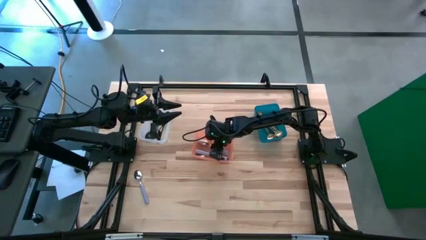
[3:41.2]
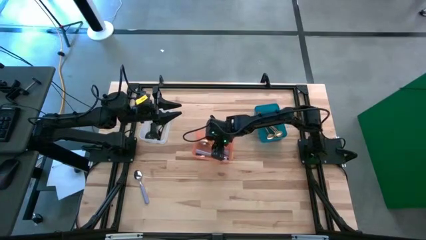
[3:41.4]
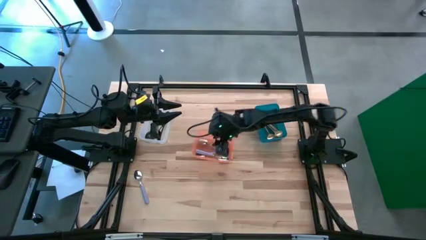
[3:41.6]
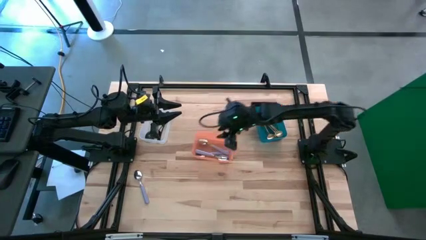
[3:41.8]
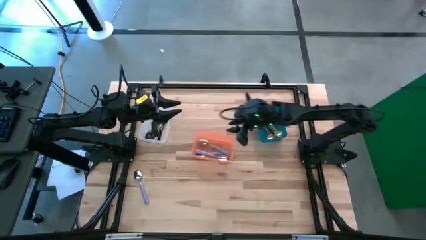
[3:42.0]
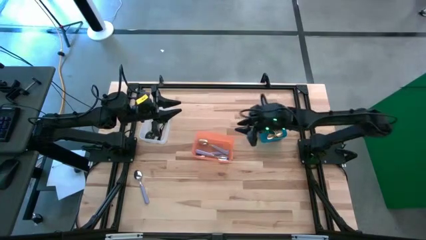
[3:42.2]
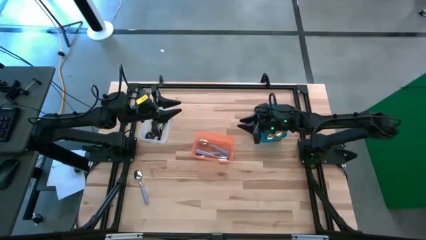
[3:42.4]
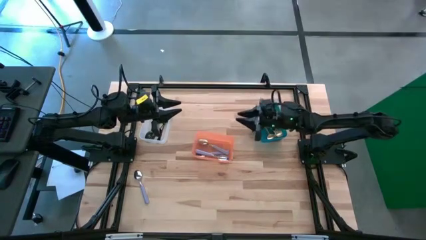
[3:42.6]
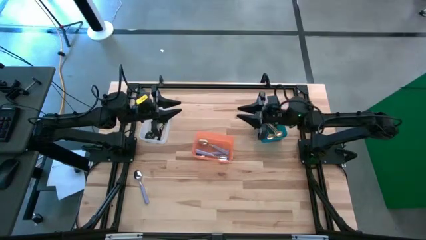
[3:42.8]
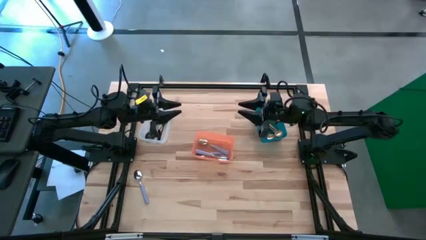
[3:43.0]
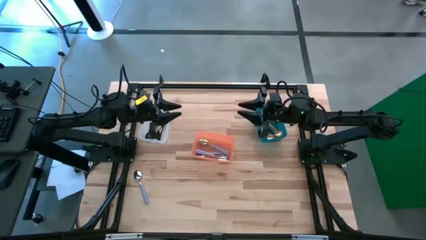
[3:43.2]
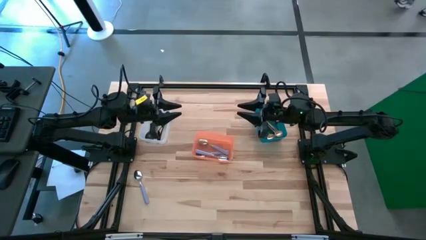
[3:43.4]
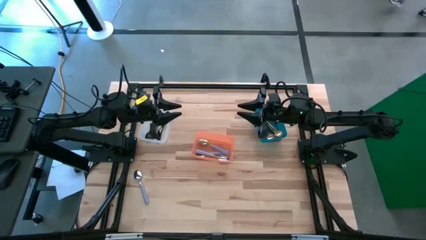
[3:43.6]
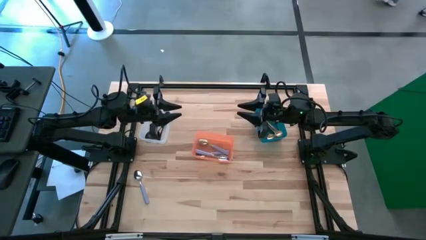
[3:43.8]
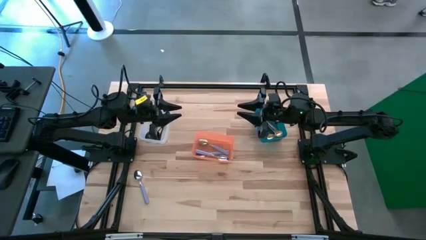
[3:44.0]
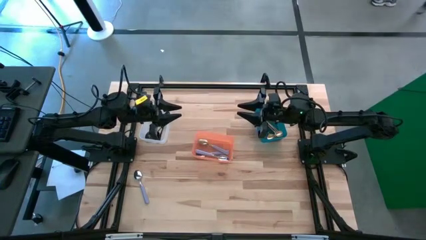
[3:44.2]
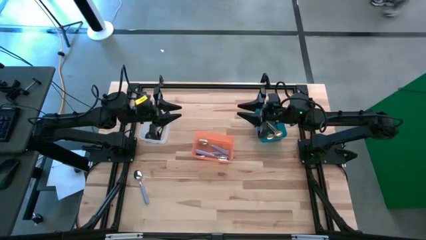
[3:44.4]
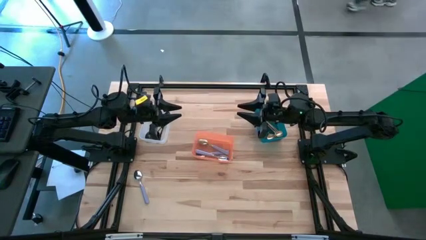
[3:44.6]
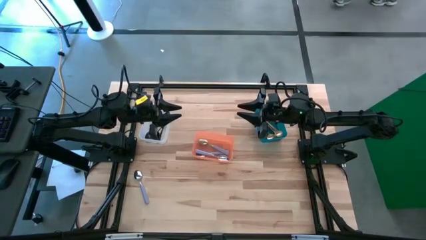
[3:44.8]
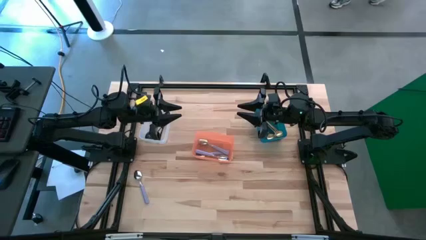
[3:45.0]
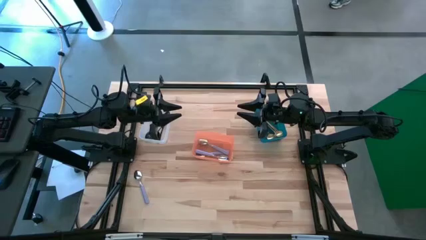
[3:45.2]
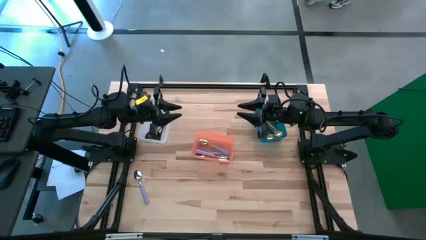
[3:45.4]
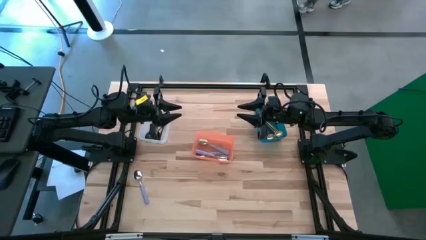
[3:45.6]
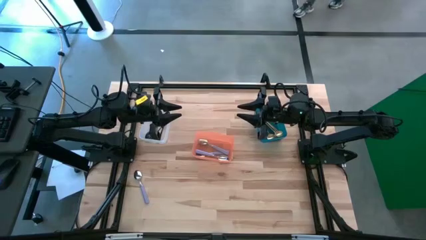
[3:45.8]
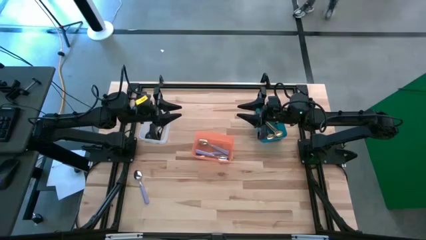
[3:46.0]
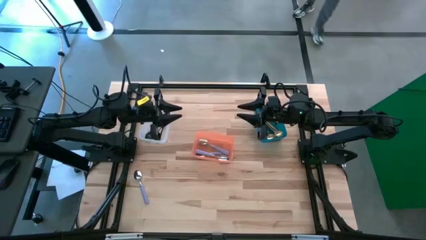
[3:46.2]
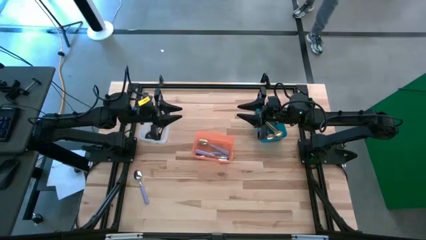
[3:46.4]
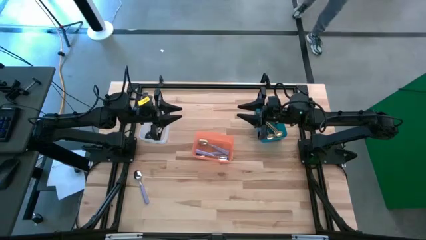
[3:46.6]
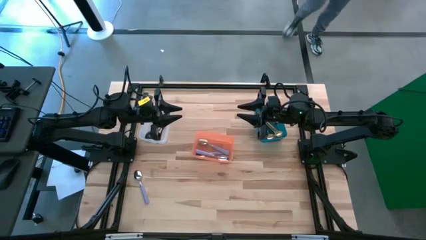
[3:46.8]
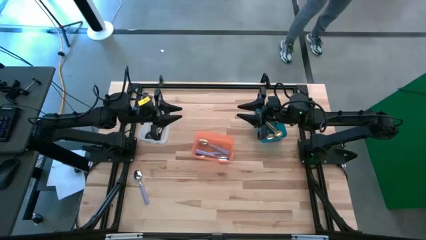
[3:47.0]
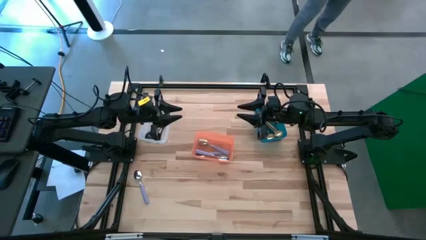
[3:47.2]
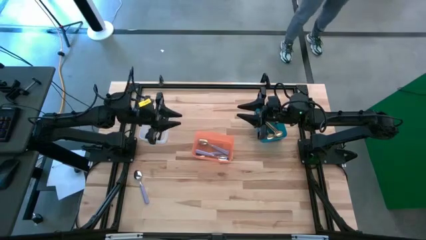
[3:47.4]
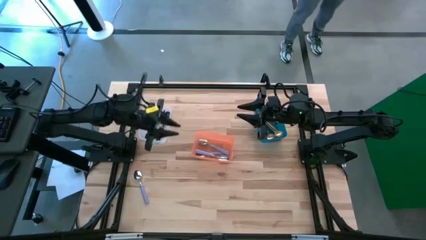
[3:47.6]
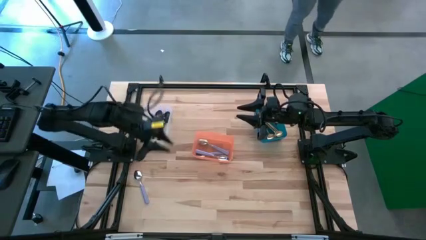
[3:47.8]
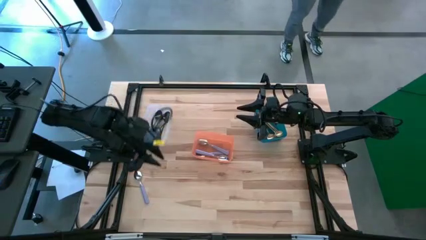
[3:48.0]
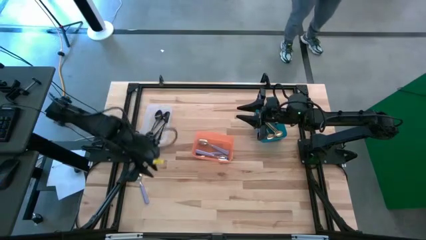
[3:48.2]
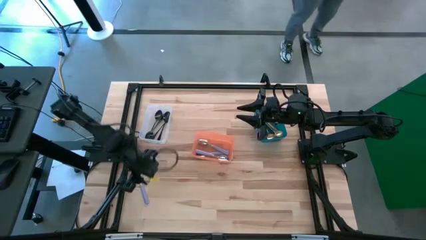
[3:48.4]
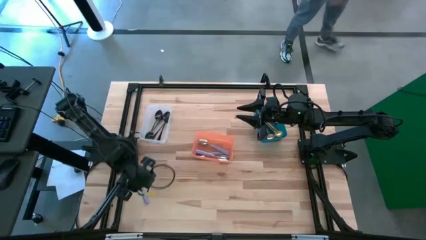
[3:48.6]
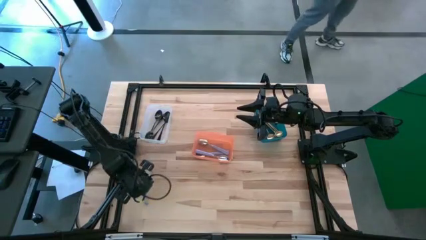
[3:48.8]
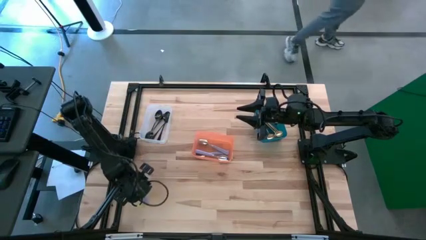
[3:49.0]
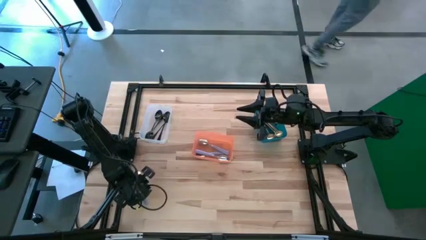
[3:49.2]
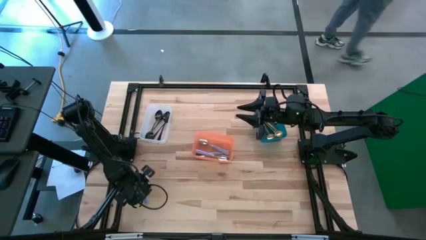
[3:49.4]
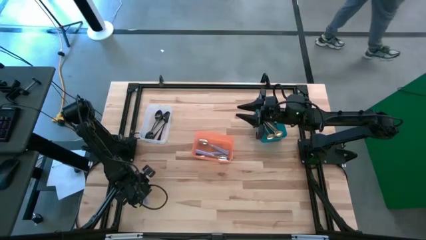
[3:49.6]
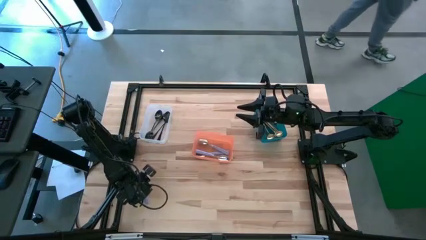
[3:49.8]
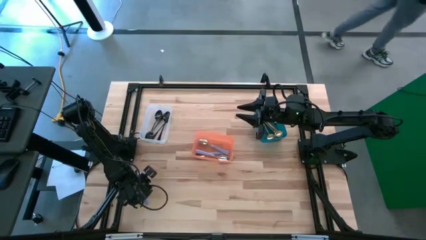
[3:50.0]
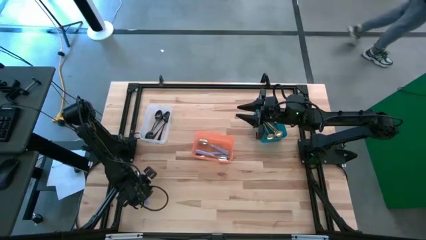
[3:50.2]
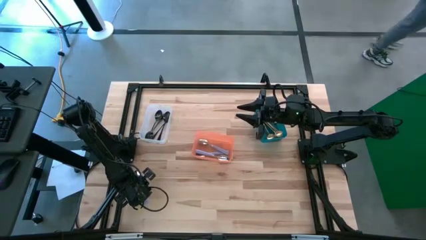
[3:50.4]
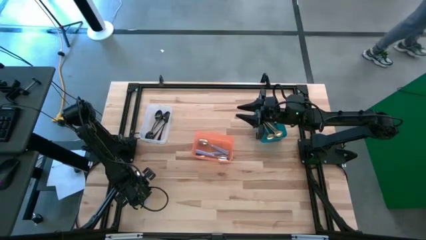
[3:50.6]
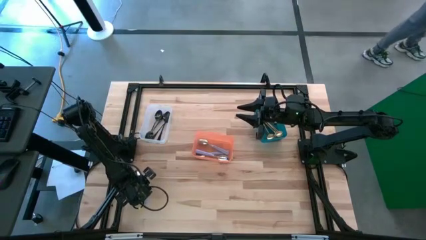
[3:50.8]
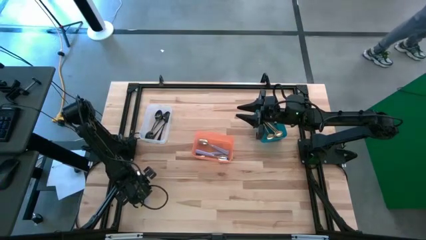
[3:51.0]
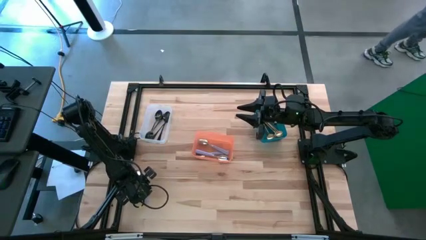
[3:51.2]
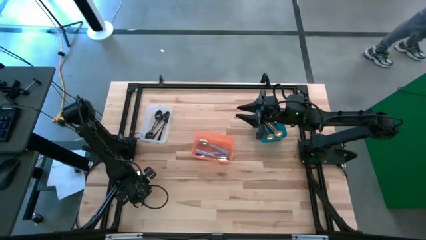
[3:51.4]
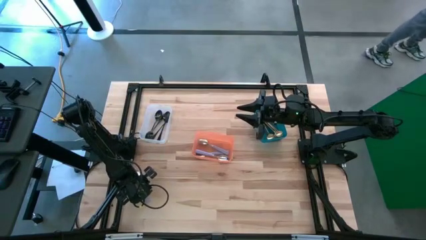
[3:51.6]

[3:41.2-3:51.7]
Task: Sort silverware by color (type)
Put the violet spoon into the orange bin

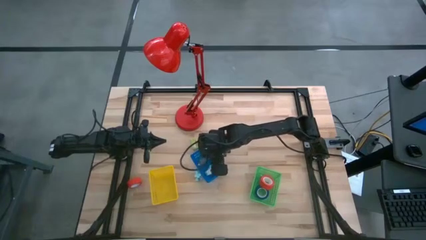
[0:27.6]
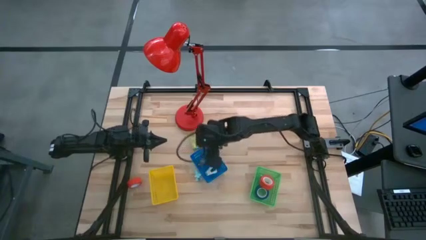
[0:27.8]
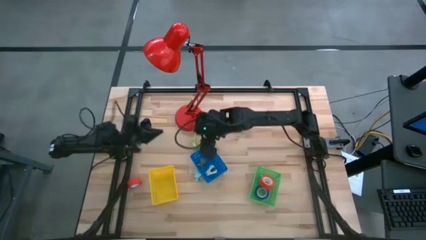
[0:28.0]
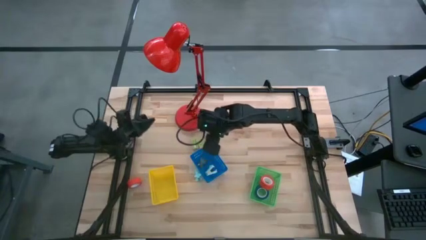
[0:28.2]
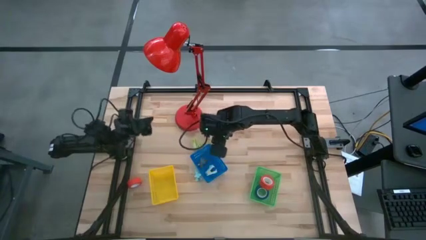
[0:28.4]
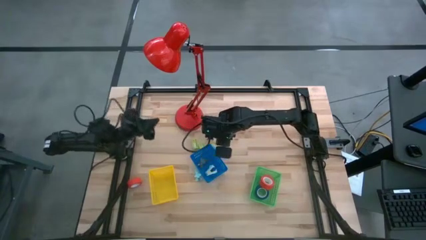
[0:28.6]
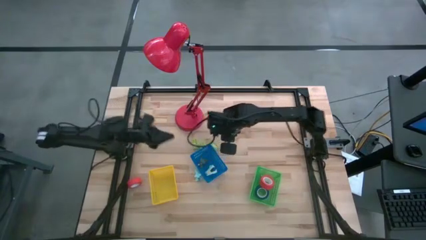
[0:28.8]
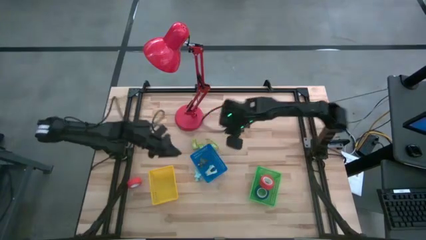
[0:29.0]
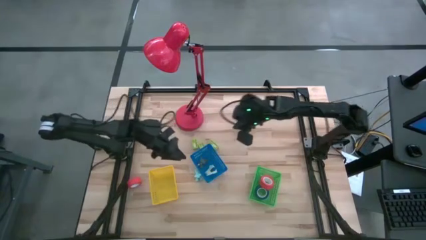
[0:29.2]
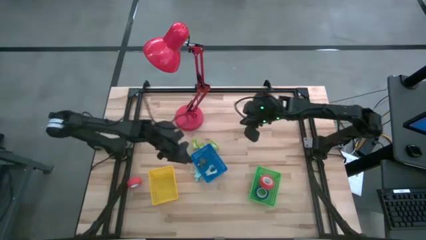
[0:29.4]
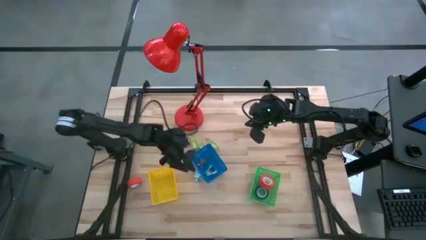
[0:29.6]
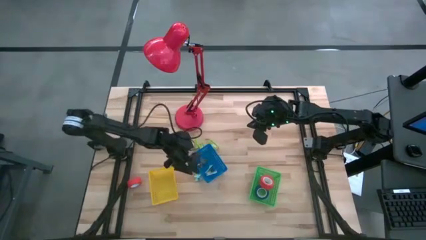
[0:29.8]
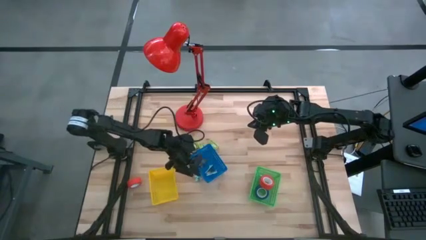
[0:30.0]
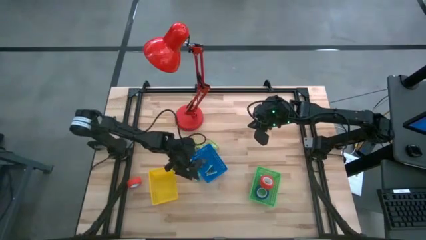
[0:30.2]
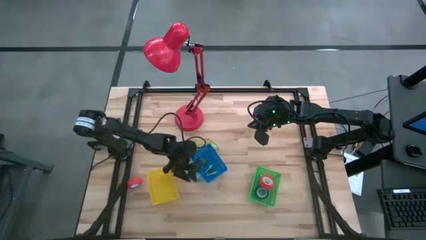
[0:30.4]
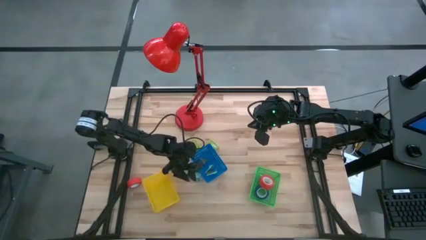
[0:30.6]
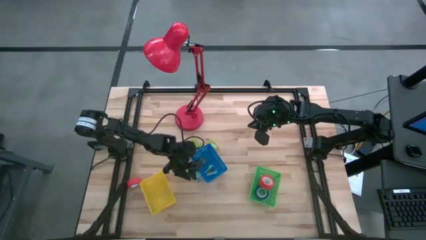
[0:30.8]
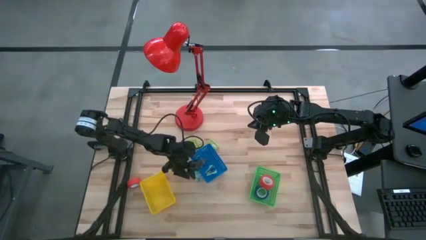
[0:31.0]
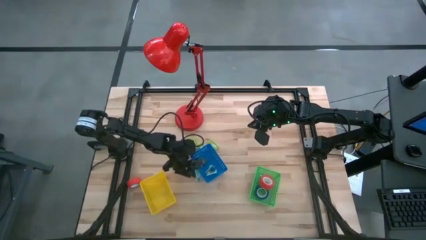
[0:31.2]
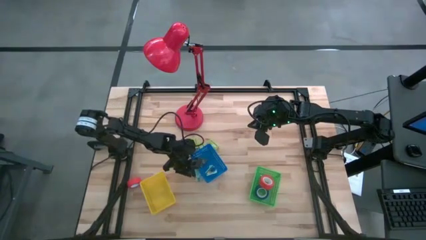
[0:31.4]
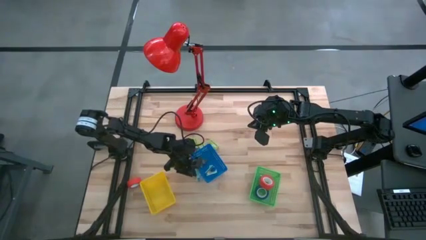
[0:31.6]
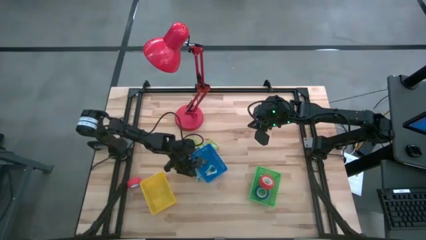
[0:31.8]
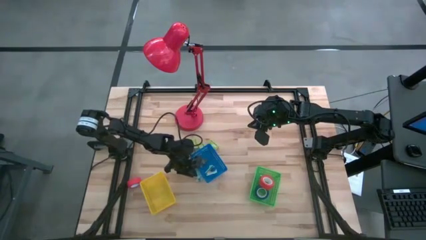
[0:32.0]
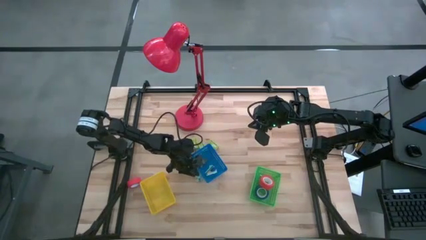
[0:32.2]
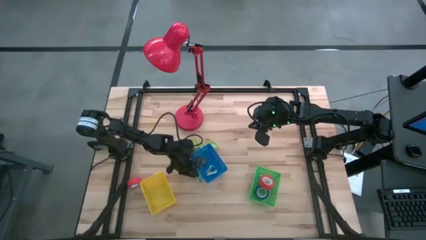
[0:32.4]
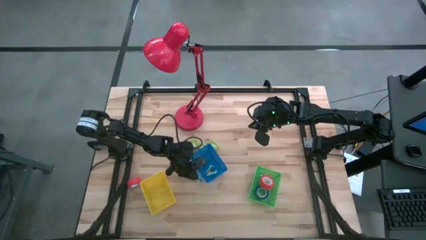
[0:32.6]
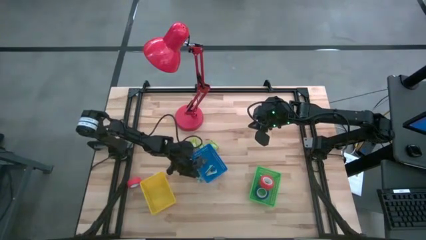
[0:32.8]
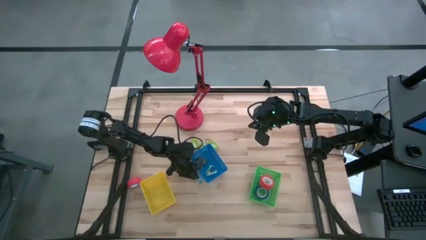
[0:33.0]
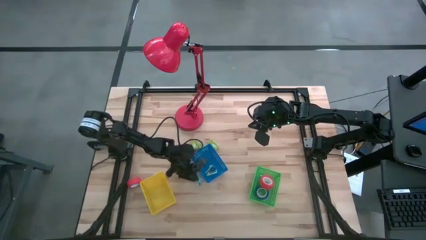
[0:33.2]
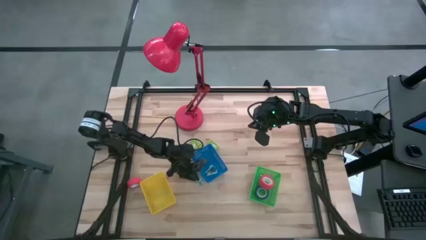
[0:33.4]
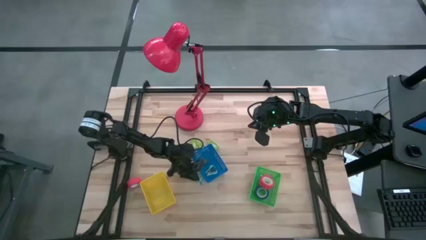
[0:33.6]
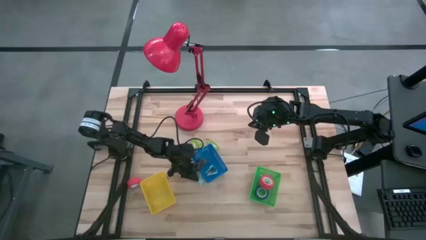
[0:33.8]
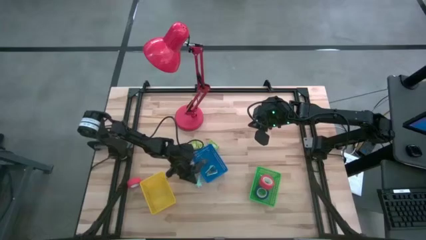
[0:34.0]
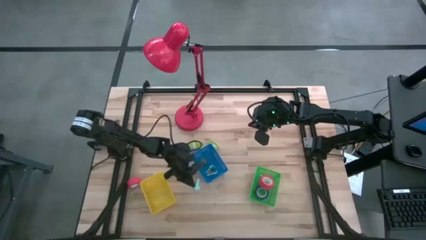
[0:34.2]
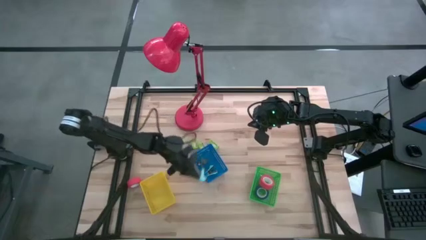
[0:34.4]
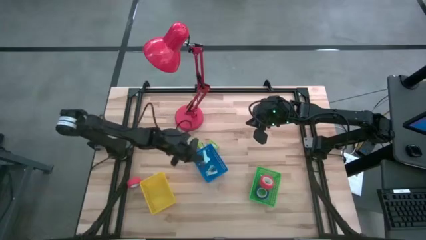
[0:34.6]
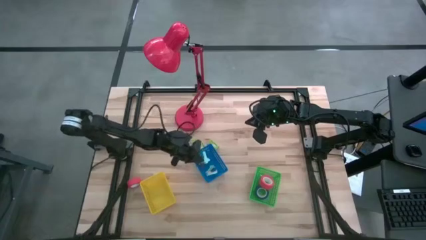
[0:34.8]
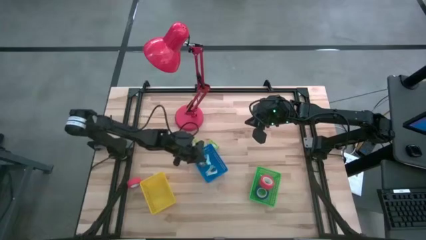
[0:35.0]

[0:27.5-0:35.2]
Task: Pick and place Stapler, Stapler remover, tape
Put the blue staple remover into the blue bin
